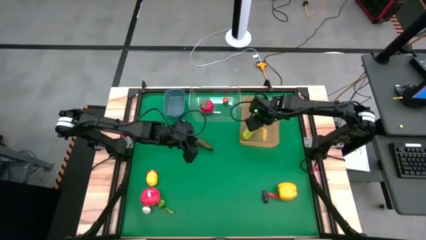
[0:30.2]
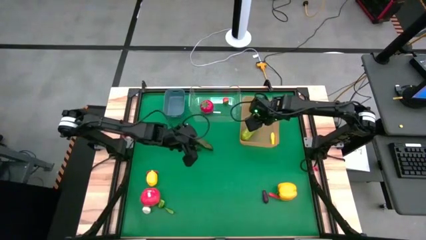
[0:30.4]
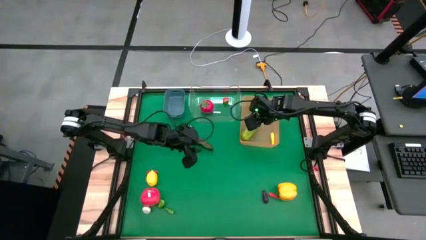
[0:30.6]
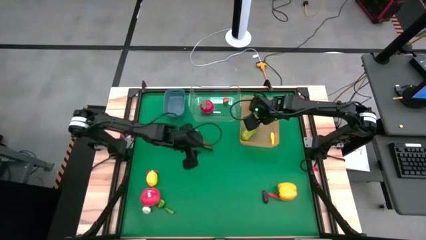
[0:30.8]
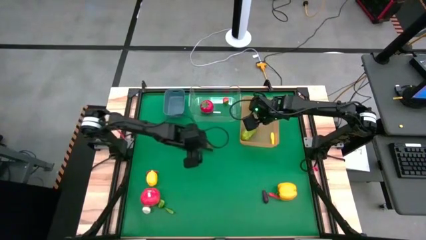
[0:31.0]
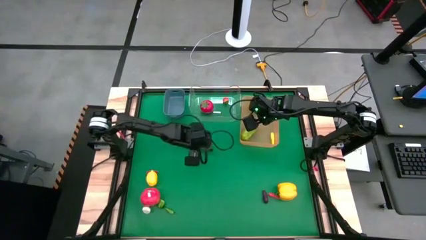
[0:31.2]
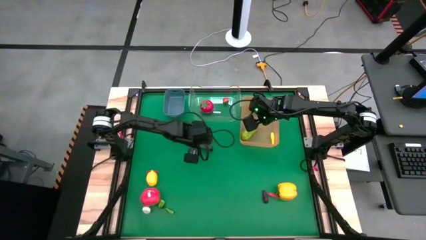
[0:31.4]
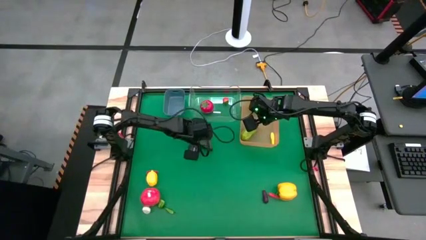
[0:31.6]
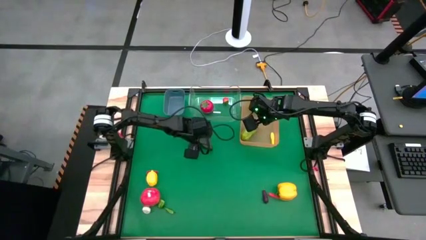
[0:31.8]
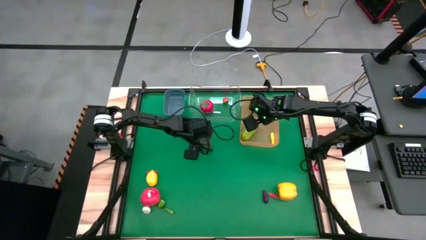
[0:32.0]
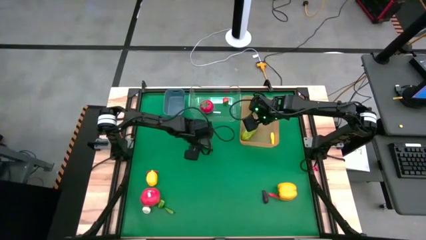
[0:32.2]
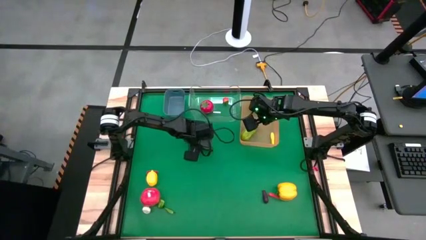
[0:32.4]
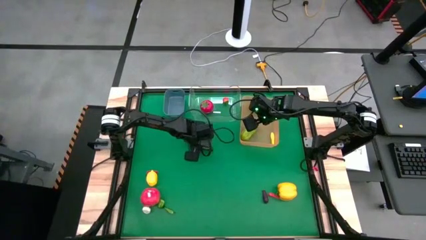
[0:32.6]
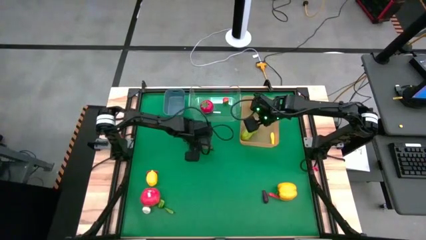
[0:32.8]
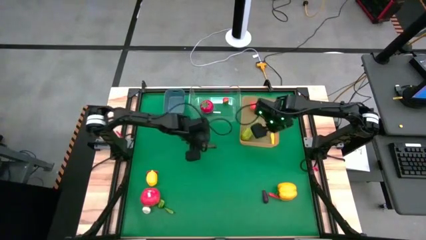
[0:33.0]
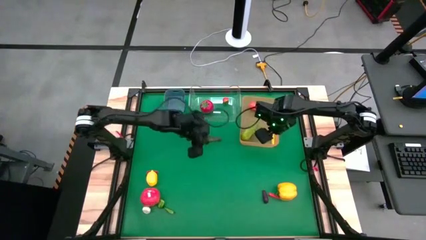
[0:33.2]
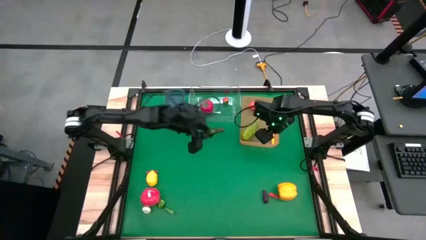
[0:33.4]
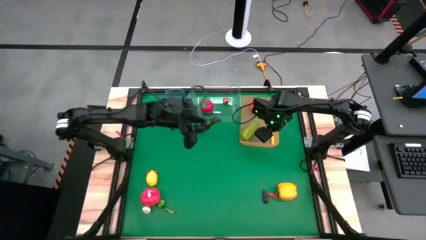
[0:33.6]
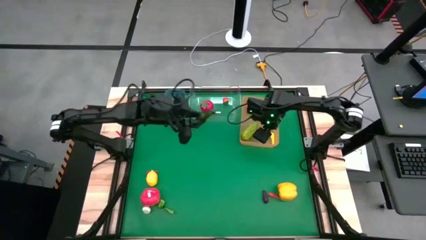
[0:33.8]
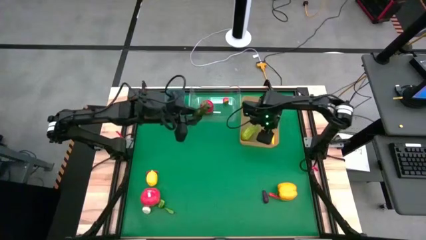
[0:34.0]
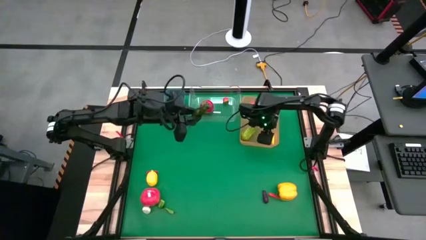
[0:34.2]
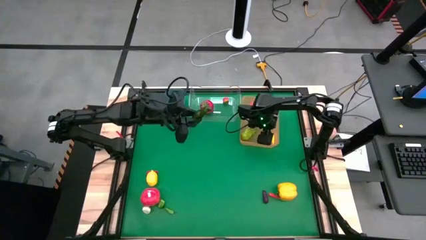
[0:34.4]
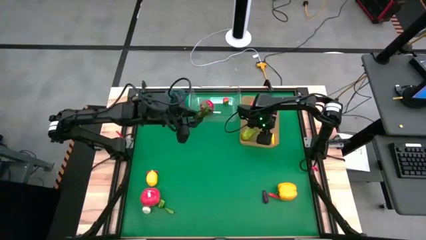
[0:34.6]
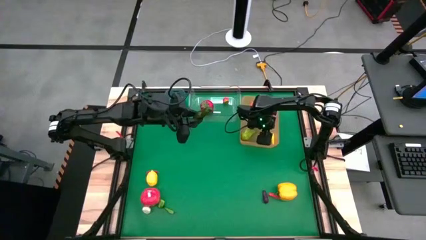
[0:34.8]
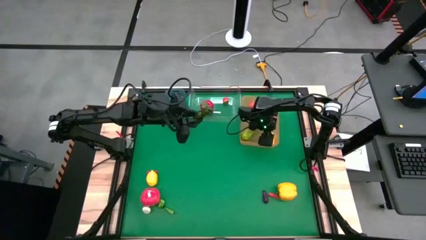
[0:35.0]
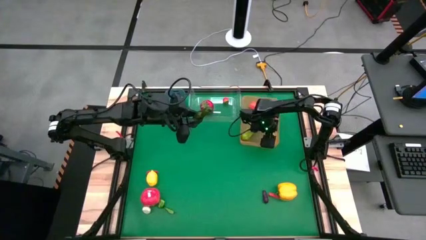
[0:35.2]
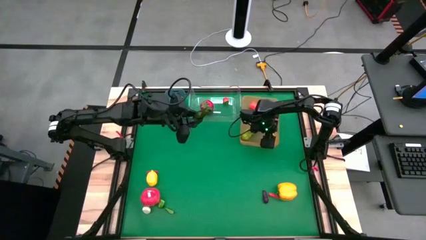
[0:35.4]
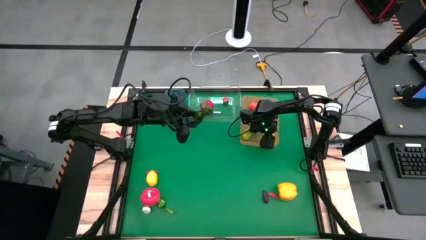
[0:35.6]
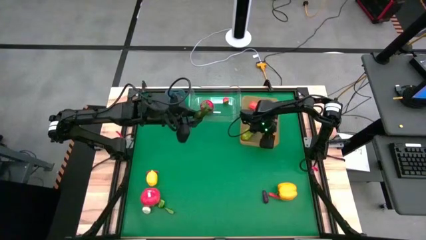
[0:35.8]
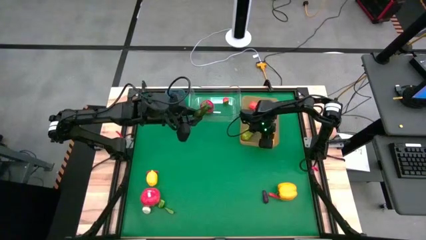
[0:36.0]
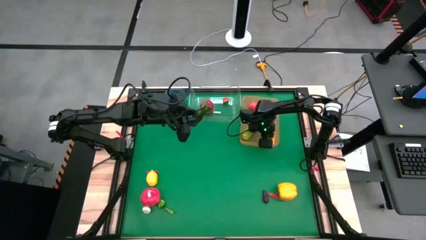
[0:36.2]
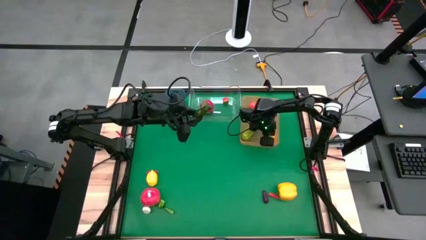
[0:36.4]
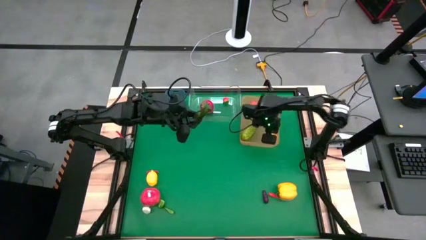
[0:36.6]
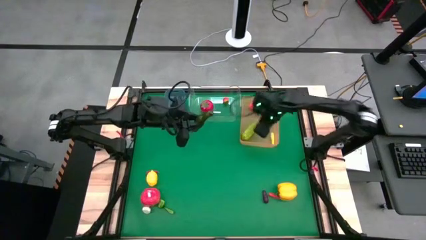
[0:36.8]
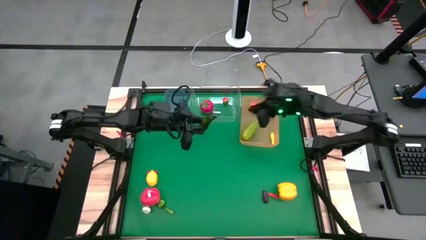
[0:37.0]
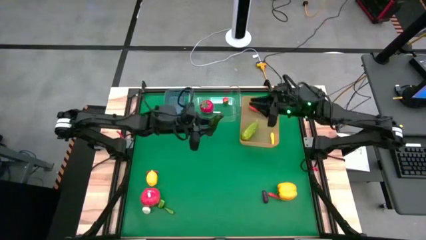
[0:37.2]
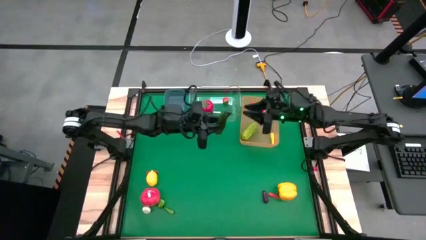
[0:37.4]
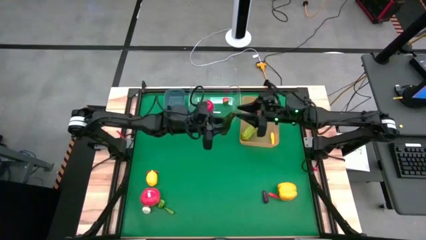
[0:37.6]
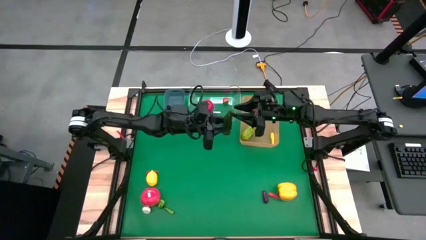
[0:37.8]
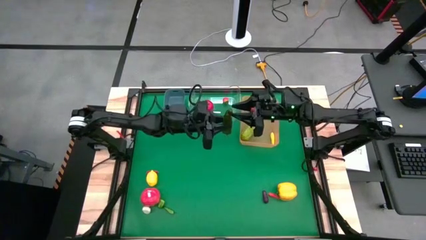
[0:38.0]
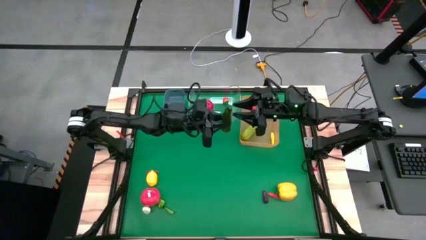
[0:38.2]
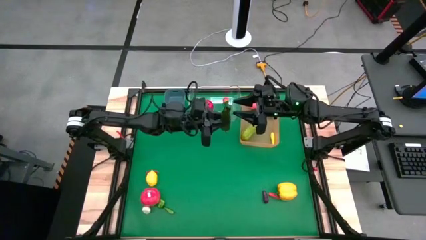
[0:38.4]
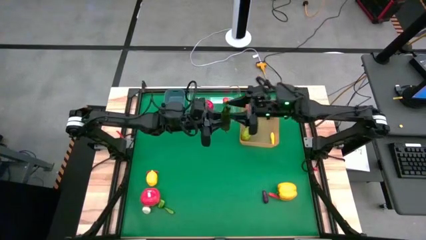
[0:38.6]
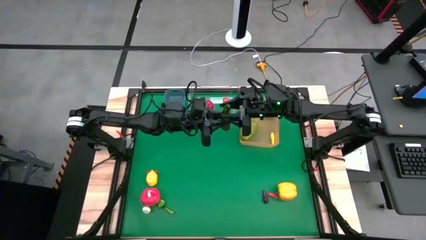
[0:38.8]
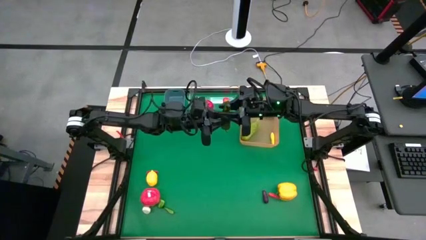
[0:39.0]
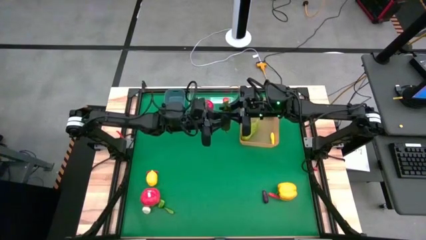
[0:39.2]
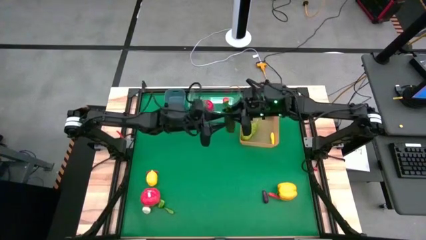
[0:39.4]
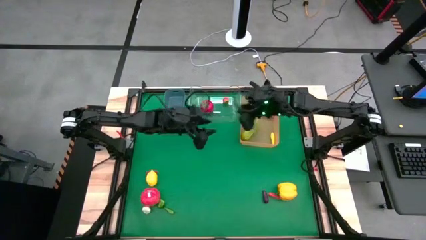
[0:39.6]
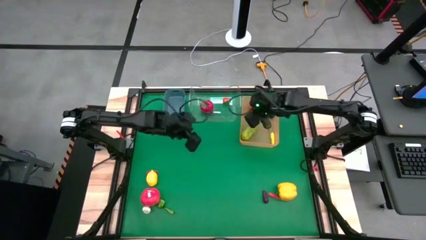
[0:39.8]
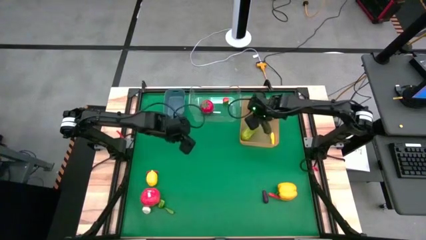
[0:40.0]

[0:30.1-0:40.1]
Task: Sort produce into baskets
Put the dark green chili pepper into the orange bin

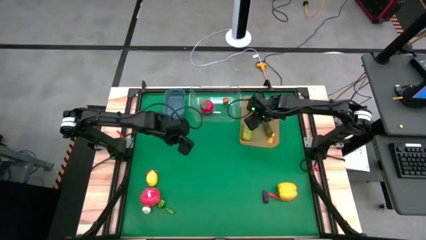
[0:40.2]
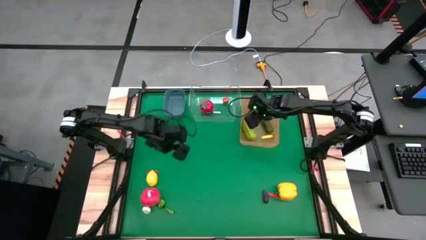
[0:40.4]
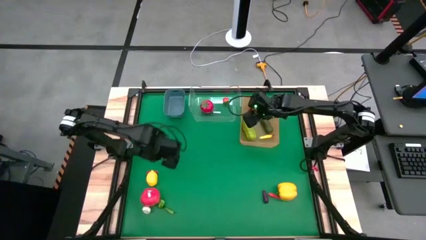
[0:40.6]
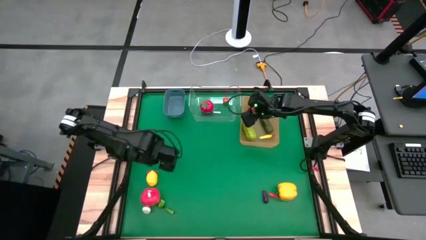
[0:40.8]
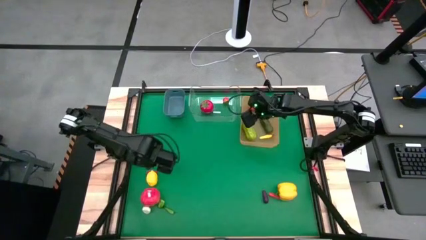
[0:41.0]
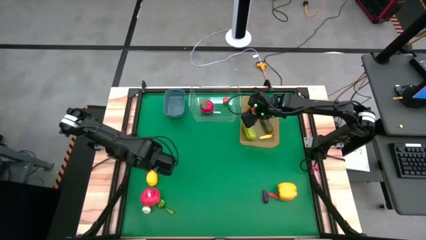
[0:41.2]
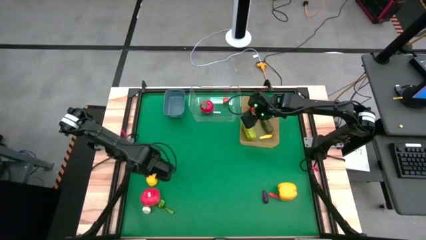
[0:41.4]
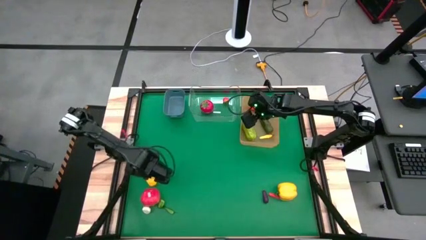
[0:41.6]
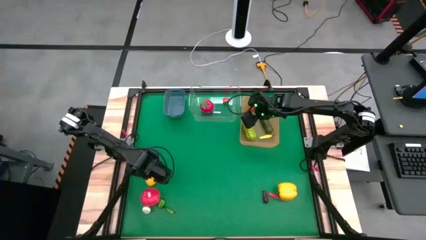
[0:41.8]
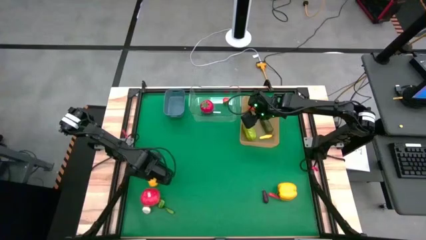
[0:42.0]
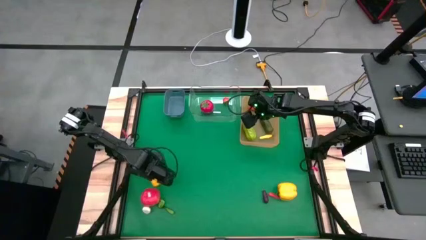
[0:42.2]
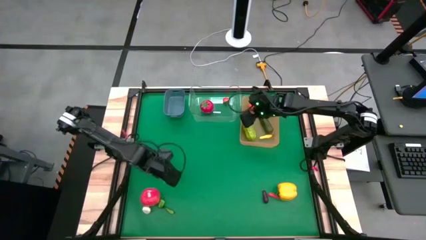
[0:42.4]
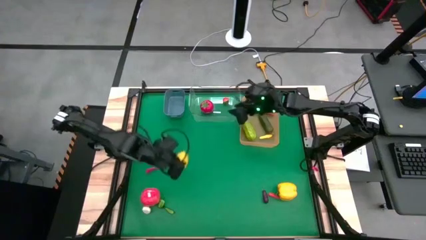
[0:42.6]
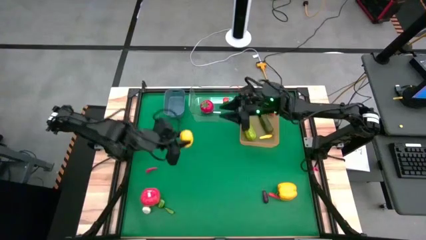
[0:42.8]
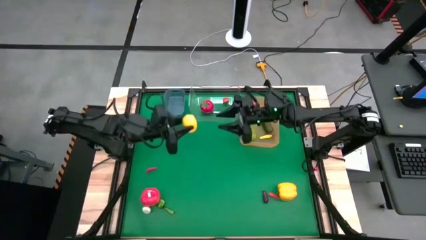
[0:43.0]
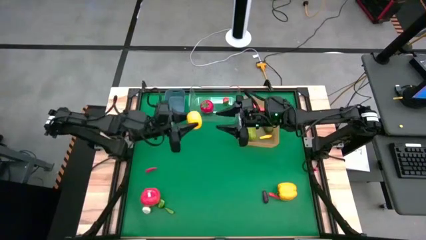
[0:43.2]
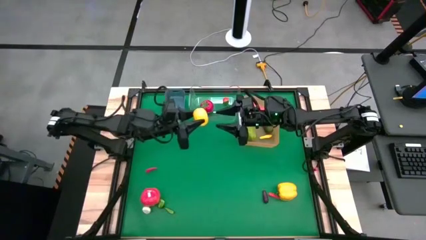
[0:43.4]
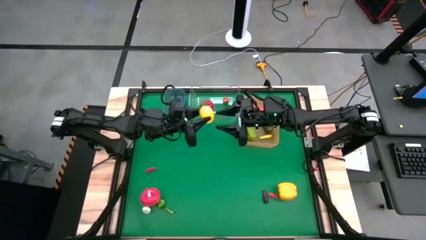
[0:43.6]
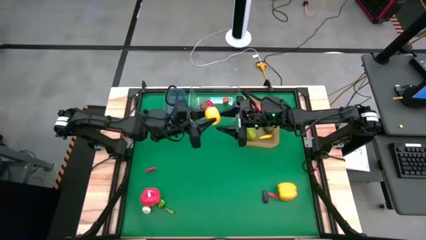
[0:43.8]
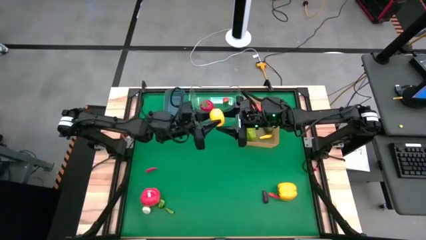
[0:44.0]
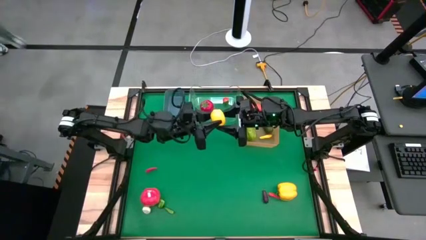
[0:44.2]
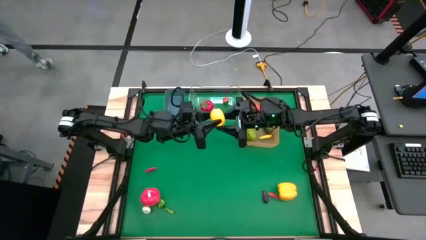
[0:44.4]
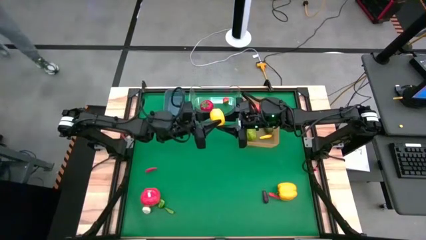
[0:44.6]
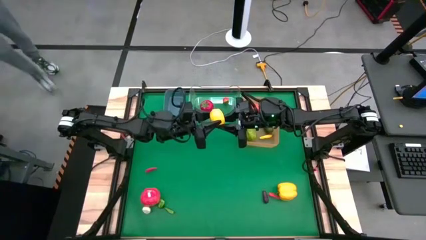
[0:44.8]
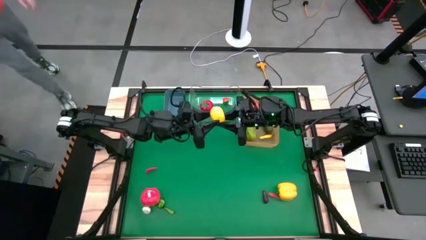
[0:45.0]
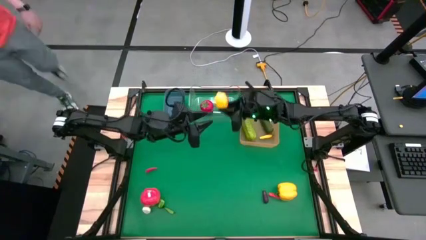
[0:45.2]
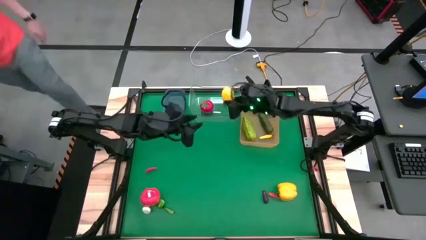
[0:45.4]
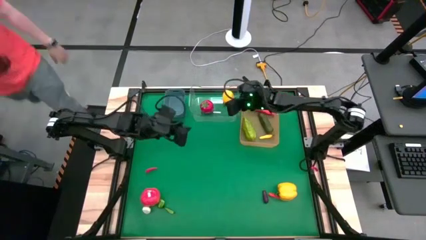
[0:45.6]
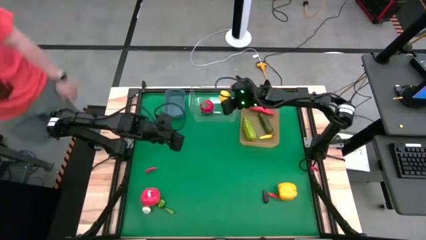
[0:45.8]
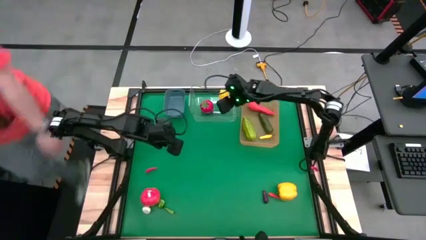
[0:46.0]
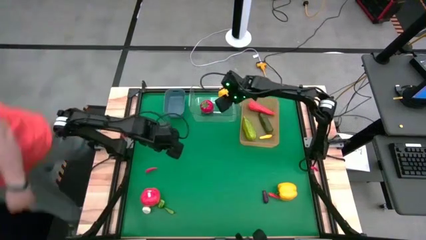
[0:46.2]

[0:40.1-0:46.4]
Put the lemon into the transparent bin

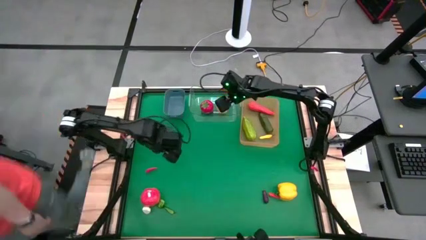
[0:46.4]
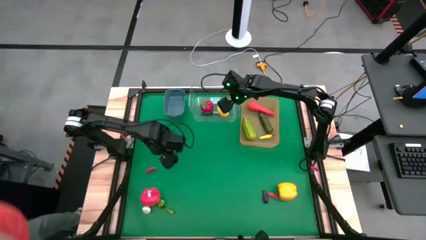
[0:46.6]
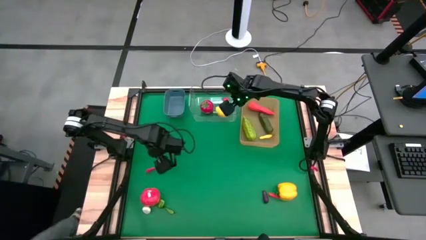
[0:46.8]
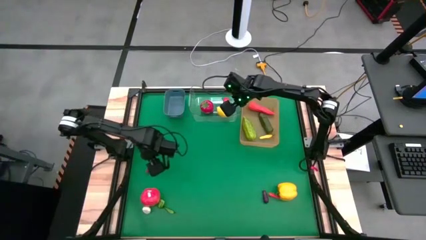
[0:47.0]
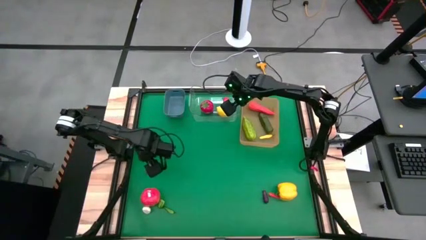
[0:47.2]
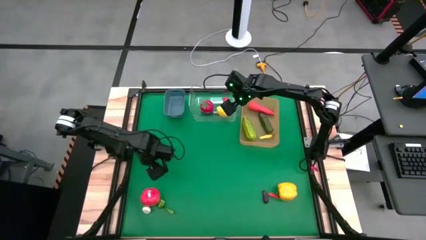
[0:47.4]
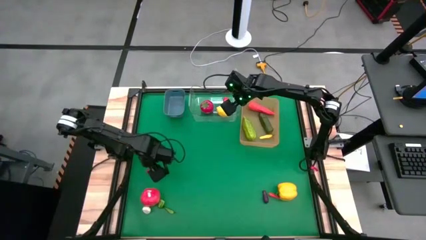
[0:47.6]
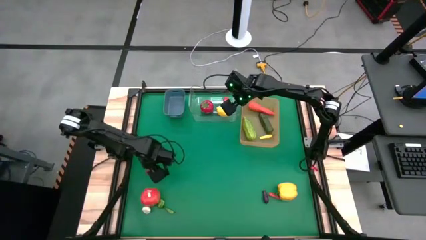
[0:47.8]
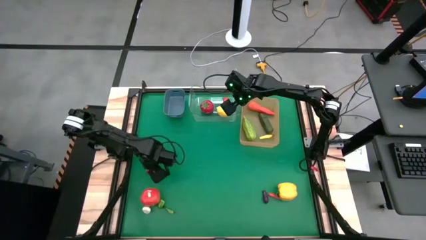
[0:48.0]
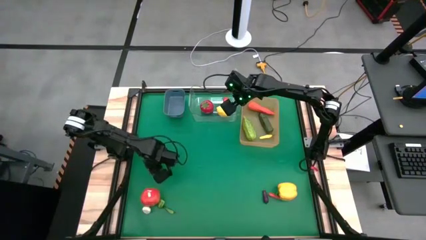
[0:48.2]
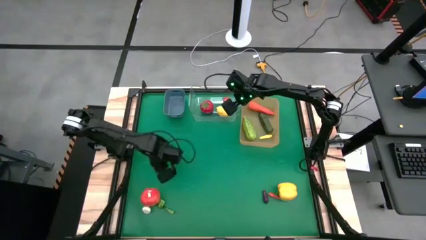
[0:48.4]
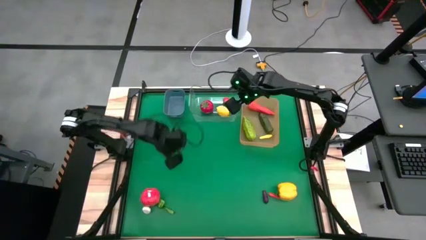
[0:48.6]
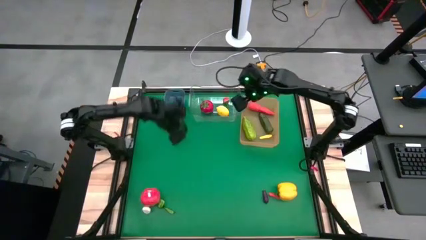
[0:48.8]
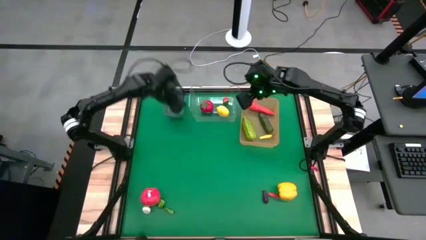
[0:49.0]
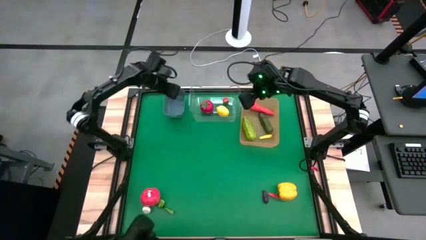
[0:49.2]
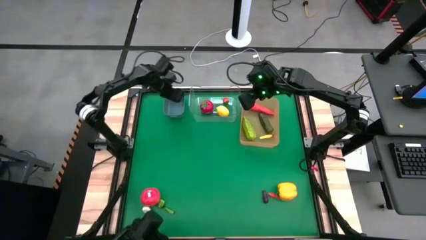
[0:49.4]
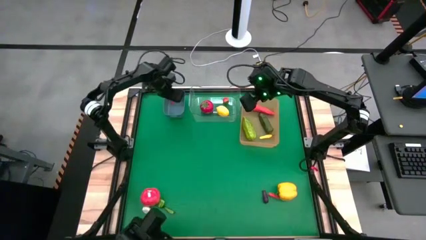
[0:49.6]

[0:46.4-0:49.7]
Put the red chili pepper into the blue bin
